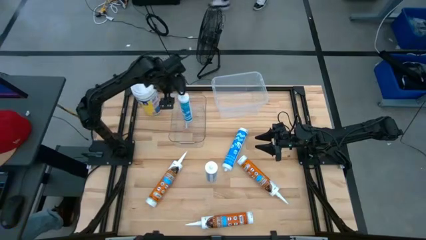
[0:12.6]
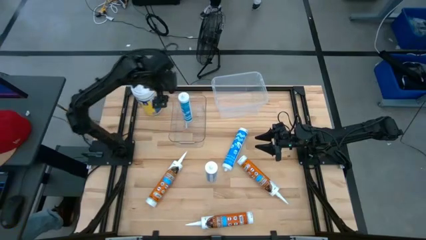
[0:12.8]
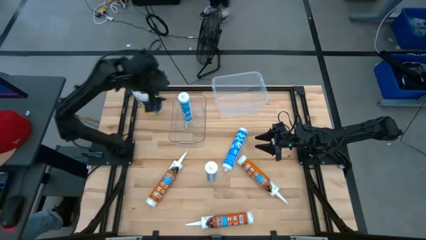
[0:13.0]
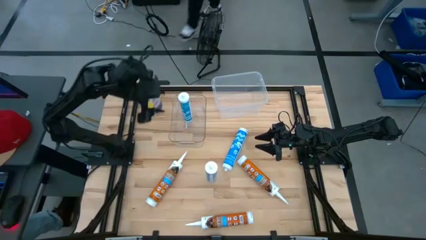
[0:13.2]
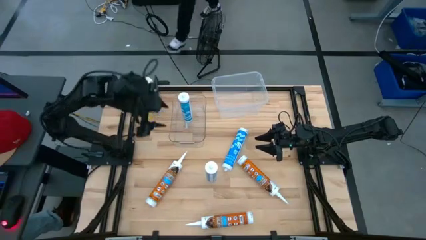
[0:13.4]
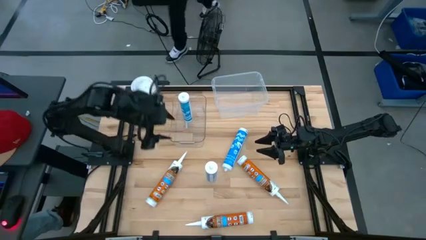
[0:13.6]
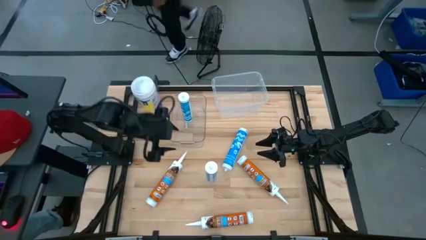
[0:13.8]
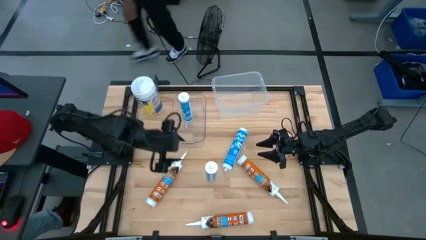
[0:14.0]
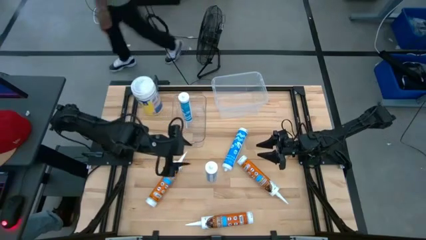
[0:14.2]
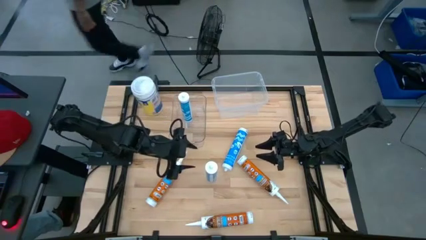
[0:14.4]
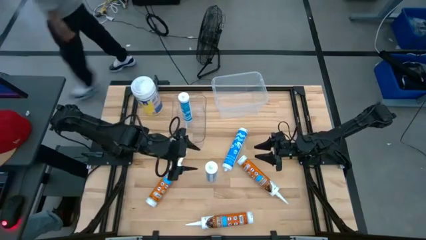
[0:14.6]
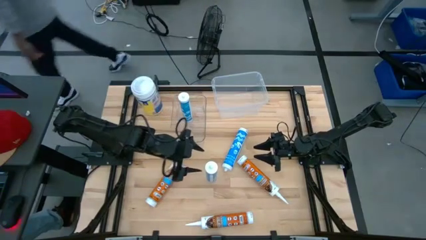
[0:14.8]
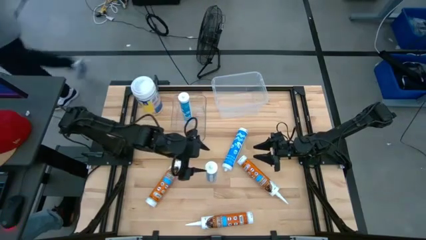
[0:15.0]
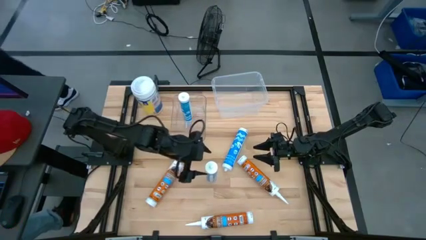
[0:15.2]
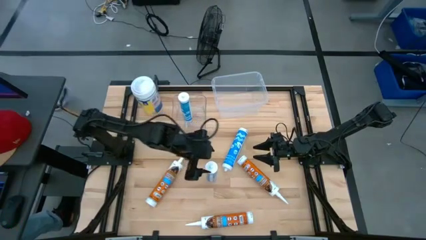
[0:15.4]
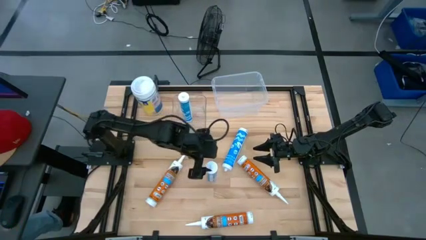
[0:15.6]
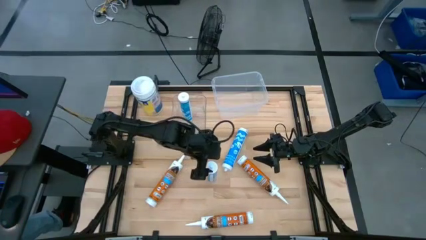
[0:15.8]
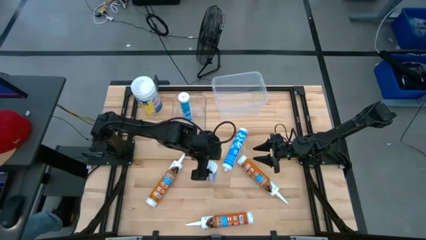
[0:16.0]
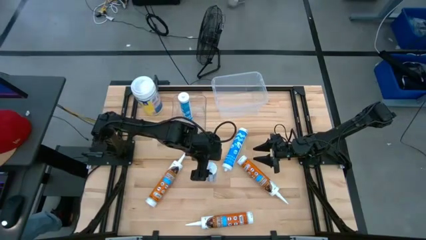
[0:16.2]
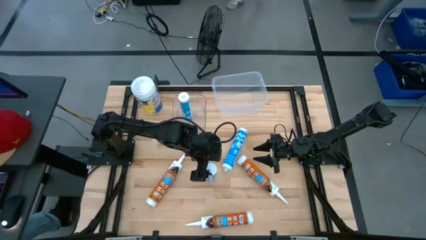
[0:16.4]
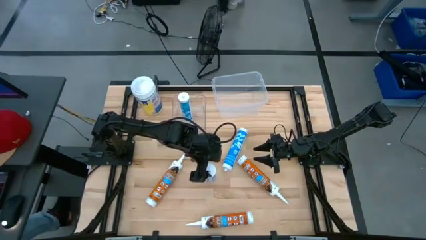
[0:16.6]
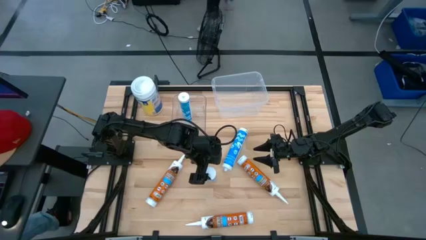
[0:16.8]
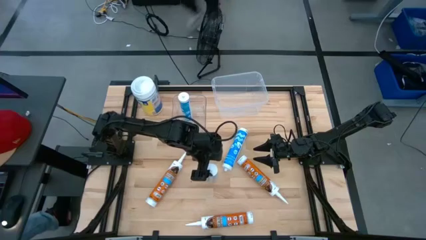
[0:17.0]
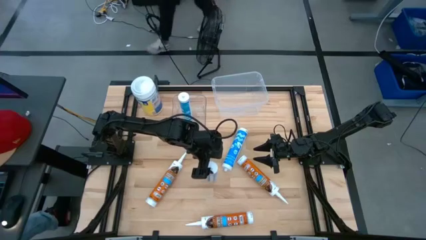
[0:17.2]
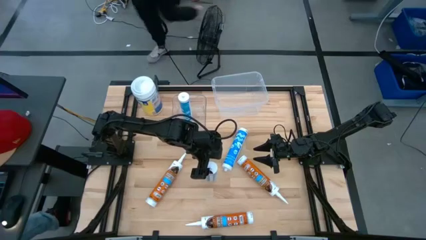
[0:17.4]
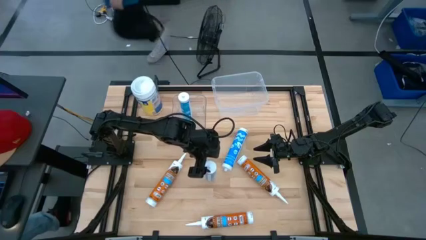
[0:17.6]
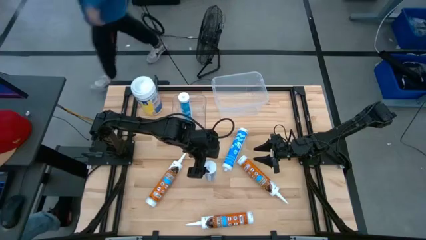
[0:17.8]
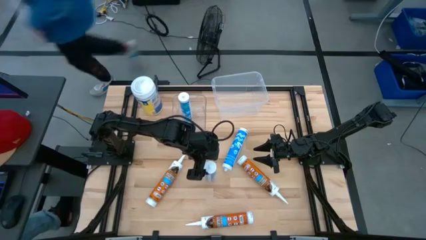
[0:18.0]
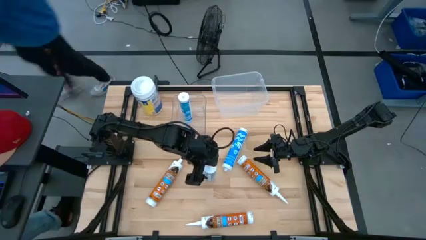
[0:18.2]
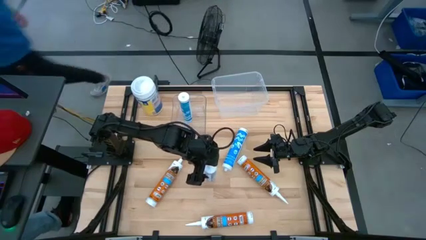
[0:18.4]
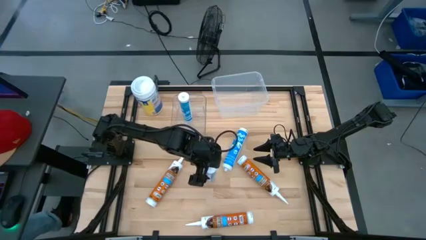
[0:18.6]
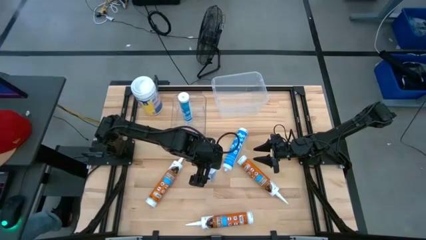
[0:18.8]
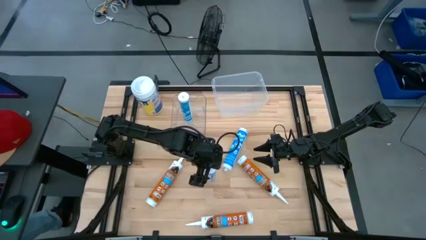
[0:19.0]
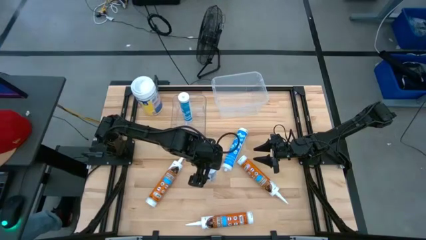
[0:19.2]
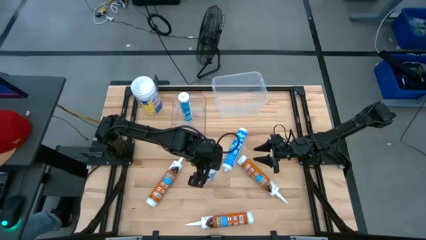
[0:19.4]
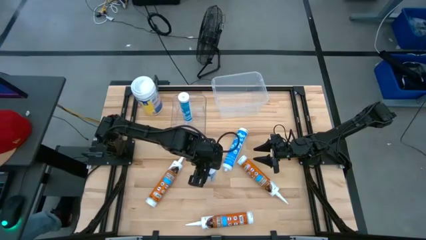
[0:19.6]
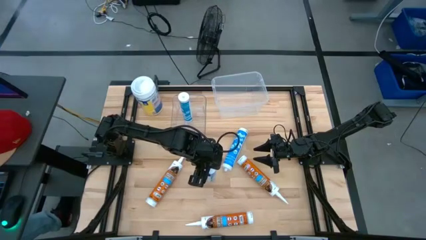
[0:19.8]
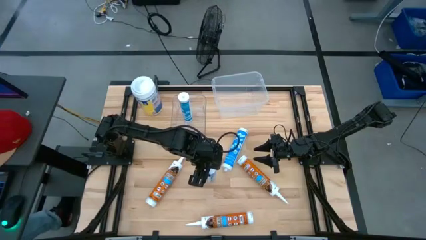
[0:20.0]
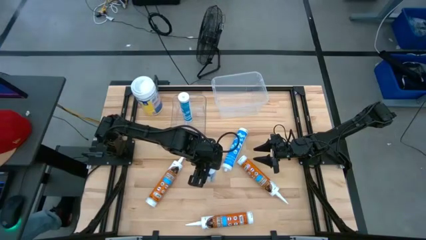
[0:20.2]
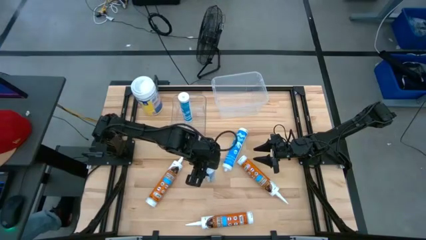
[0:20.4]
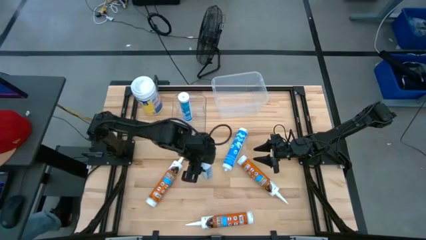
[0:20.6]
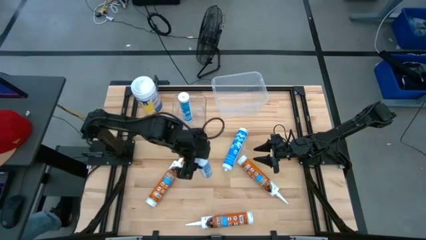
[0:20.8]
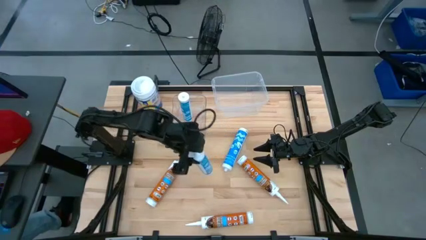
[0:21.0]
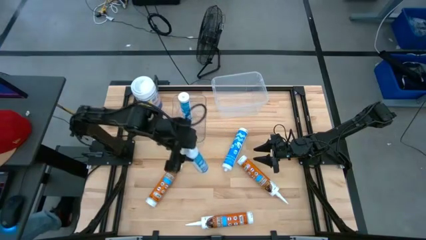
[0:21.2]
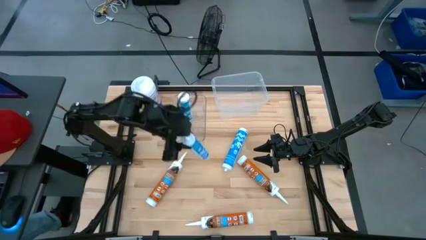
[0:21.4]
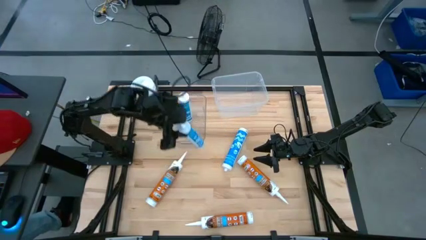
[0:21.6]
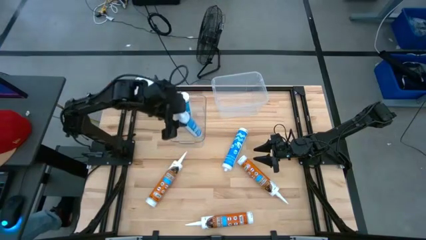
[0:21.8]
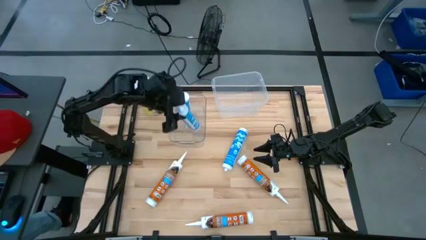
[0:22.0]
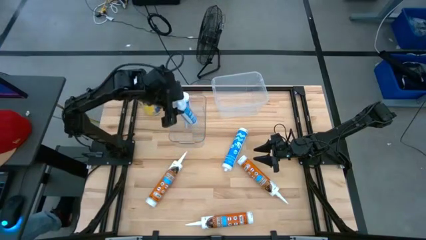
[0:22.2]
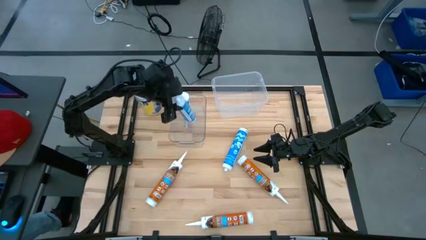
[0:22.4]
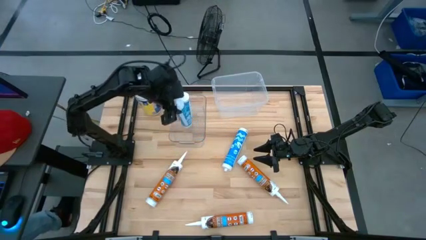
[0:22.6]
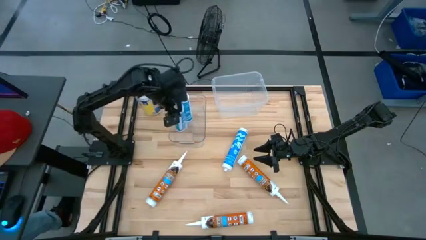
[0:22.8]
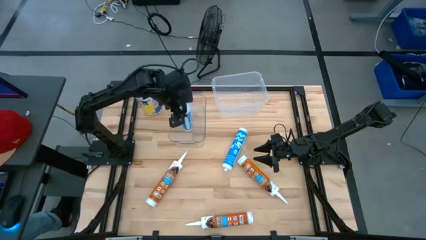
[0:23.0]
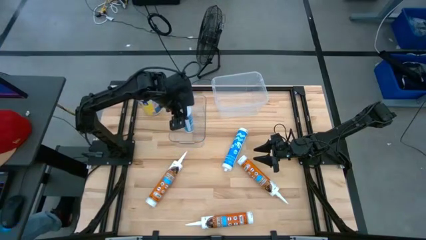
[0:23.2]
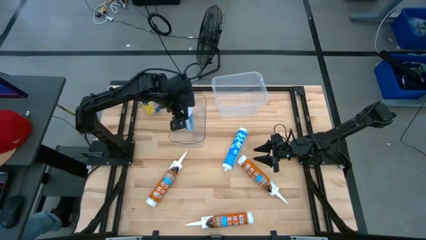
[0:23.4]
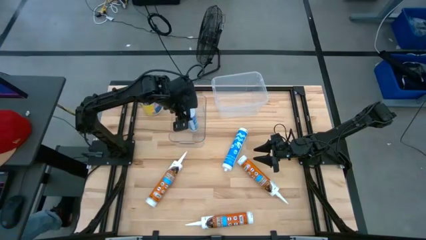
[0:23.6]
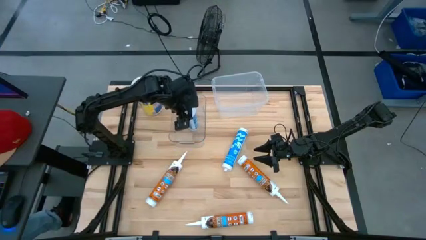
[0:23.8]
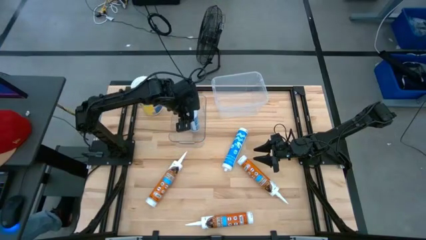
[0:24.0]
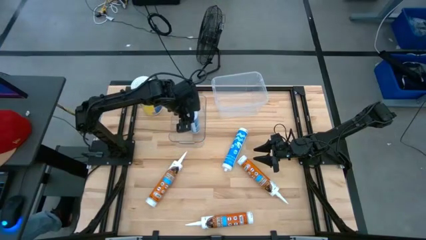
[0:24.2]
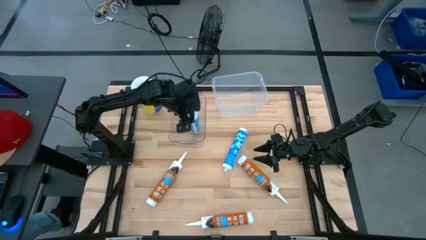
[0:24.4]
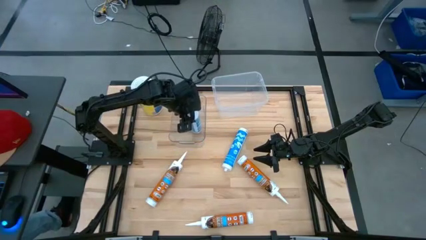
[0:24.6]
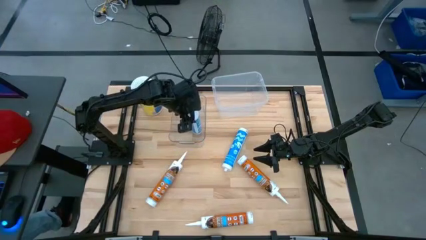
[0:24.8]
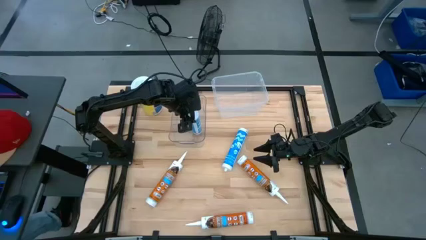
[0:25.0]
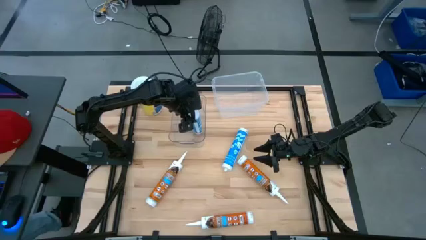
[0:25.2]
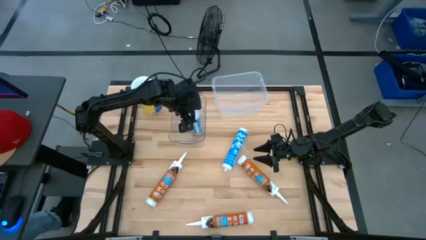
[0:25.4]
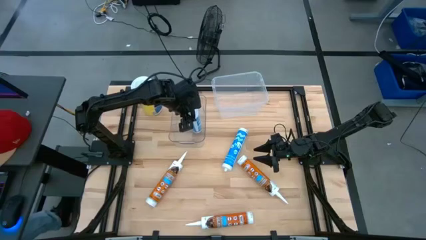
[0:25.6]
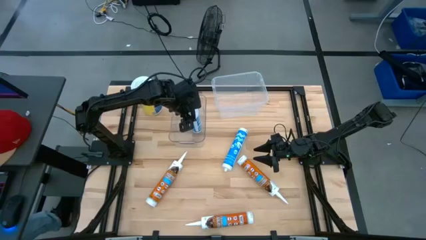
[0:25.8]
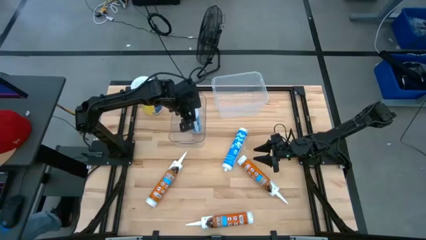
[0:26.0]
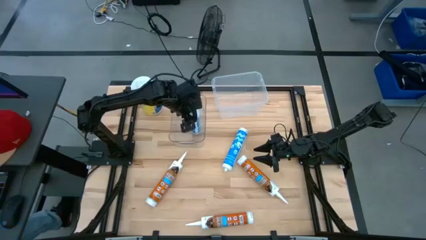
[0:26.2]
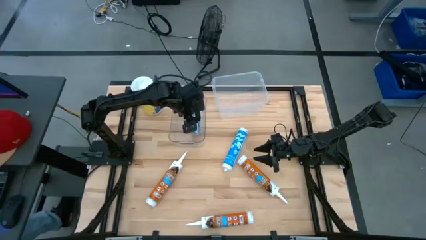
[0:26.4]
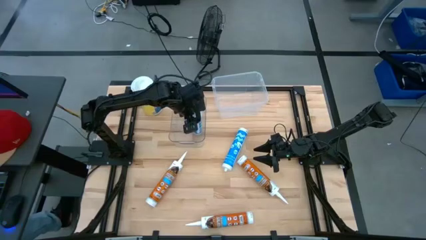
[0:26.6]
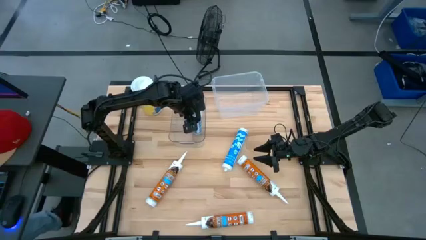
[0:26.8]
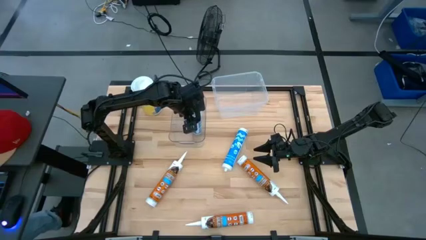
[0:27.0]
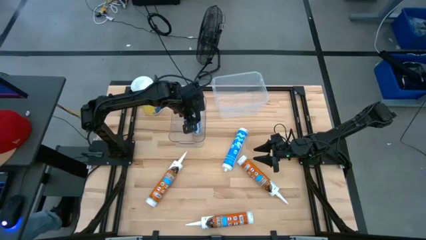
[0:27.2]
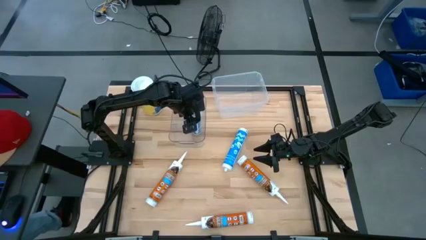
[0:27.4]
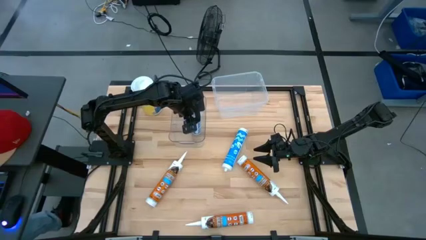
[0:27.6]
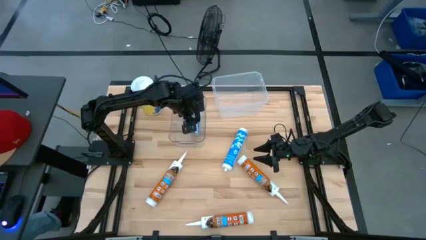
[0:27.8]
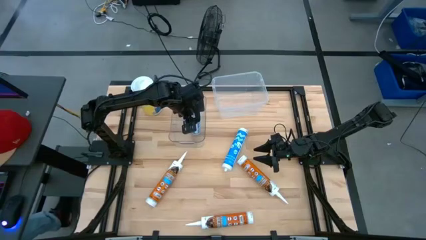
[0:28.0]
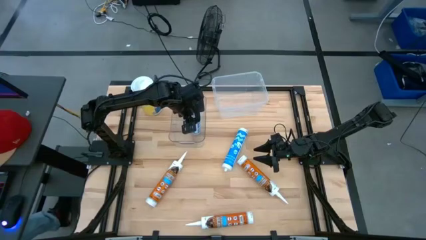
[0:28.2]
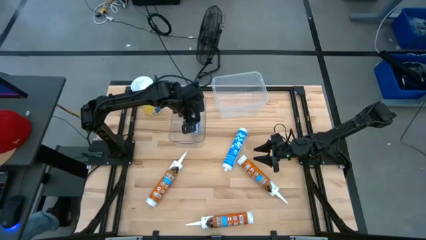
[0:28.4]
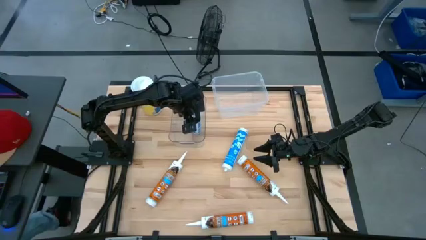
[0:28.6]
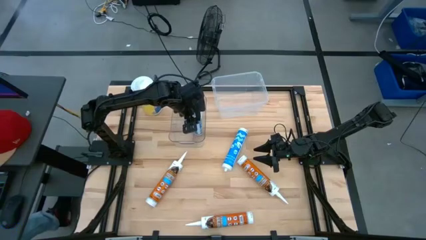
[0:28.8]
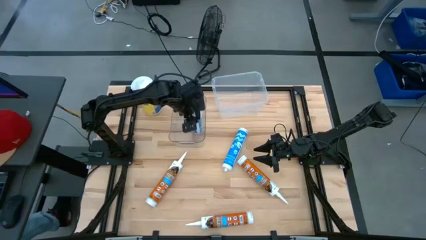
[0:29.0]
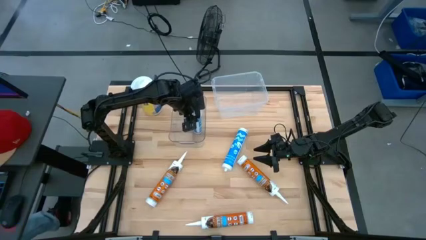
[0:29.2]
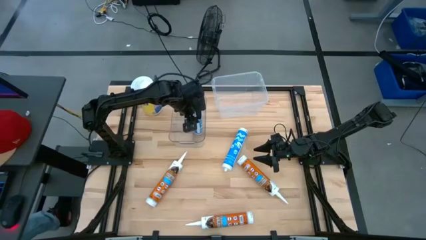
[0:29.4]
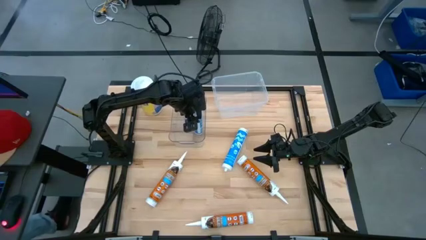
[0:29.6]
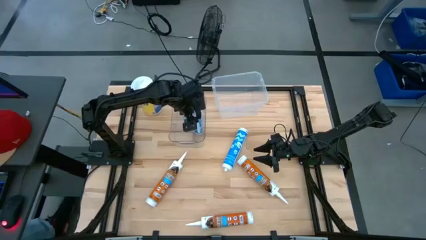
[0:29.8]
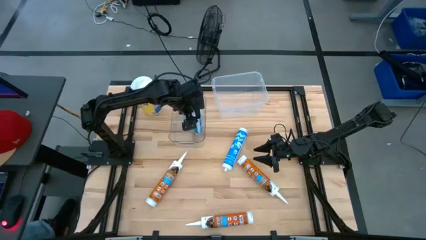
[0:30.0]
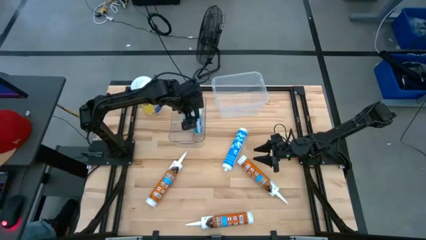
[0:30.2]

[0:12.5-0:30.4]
Task: Pick & place silicon tubes, Sealant and Lysol wipes
Put the bottom blue sealant into the transparent bin
